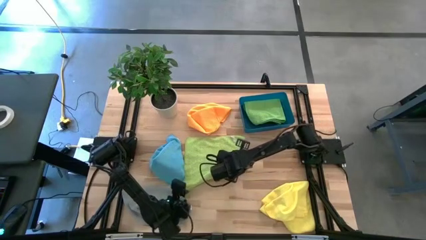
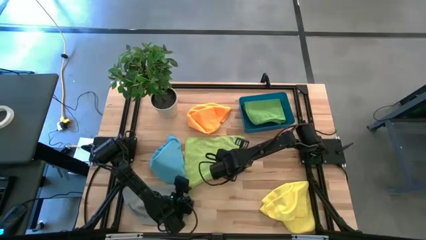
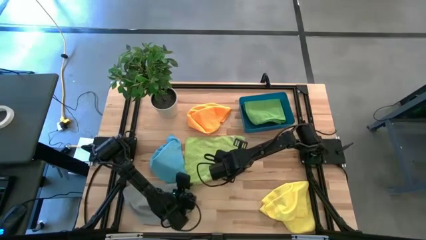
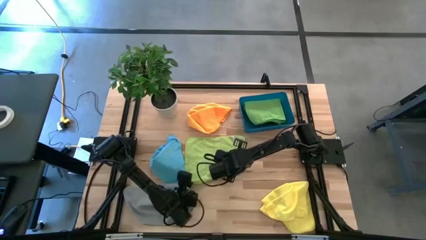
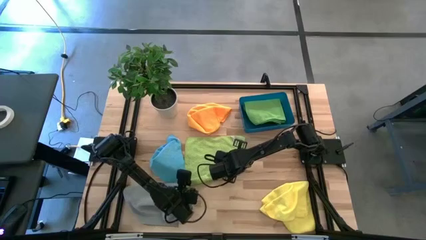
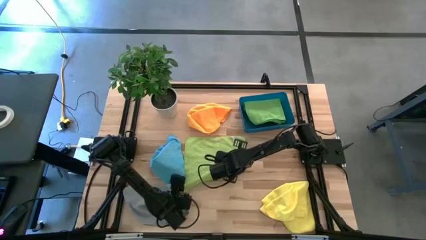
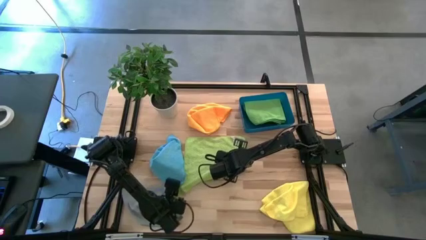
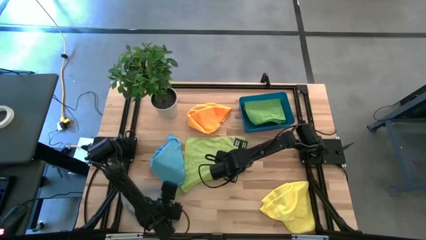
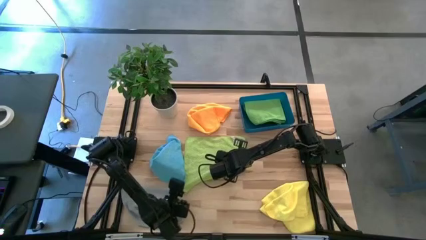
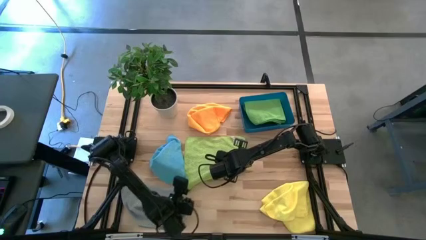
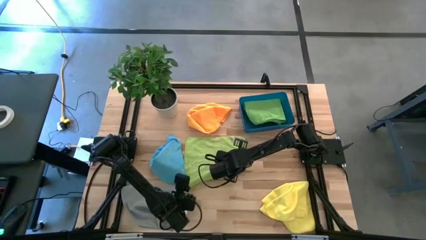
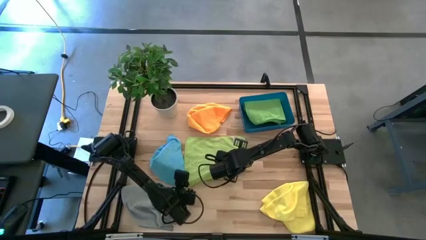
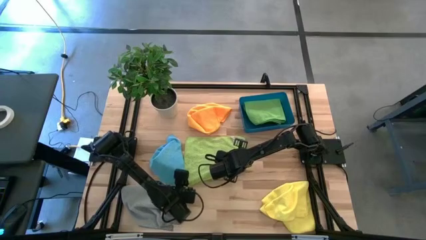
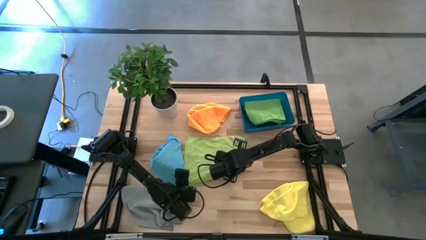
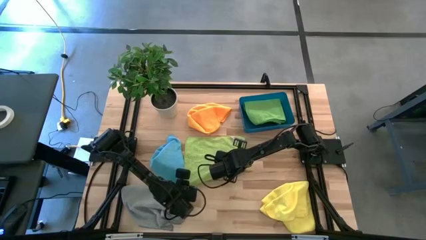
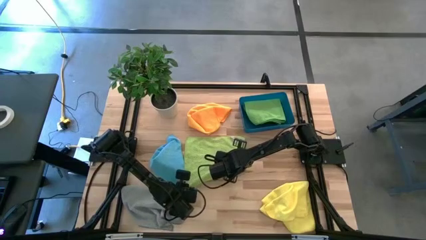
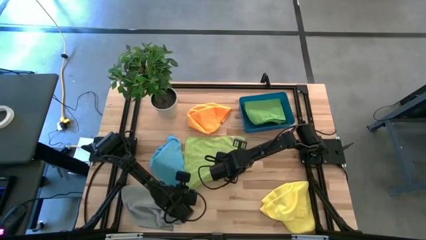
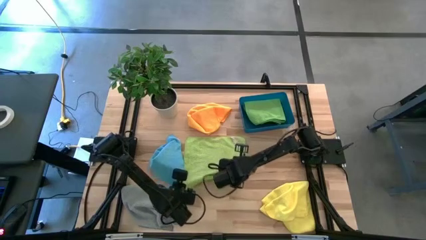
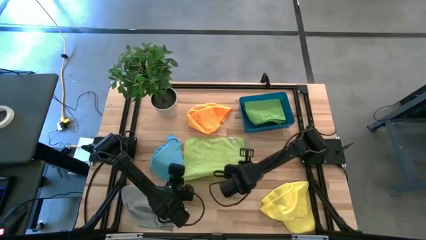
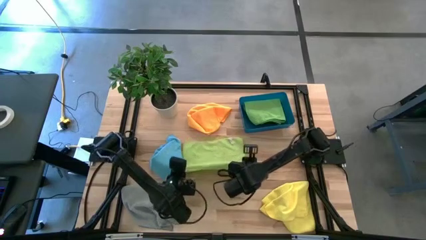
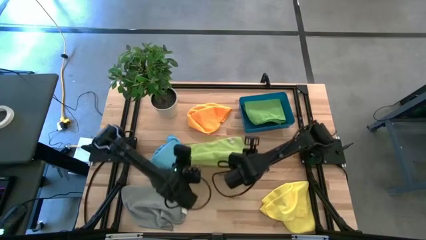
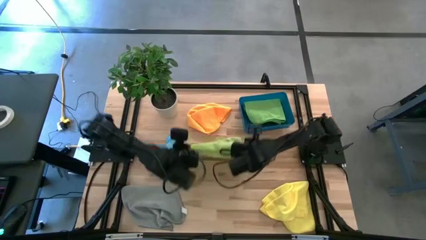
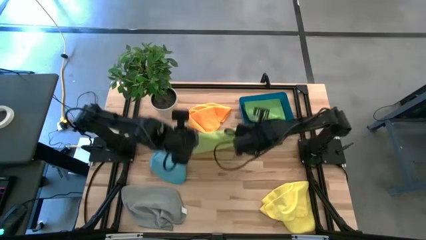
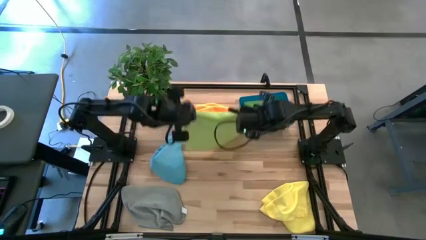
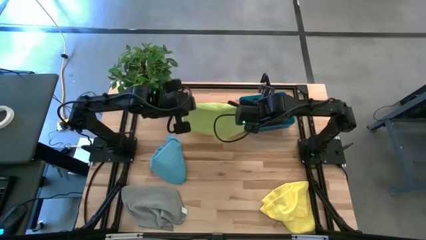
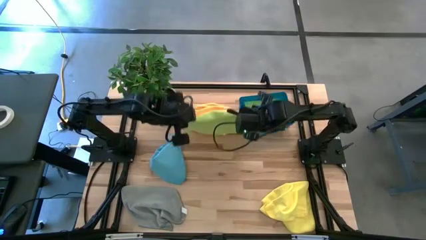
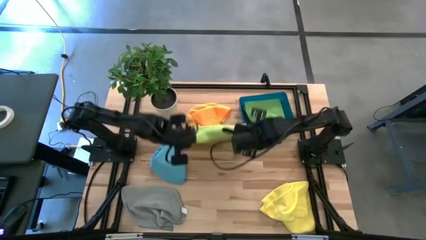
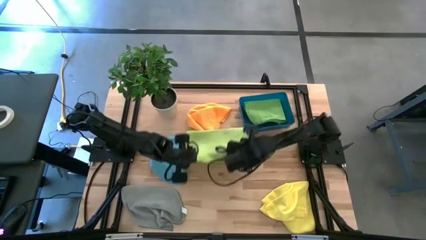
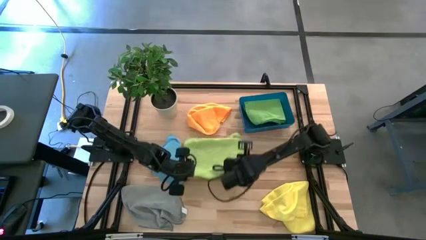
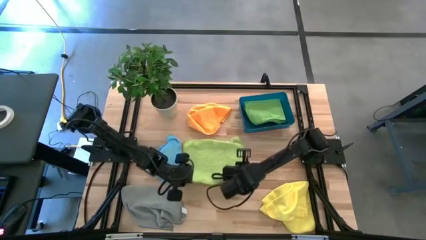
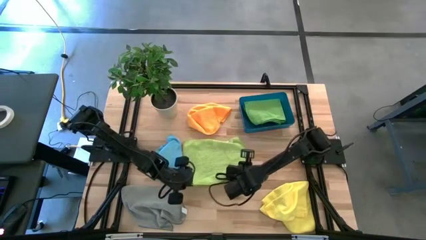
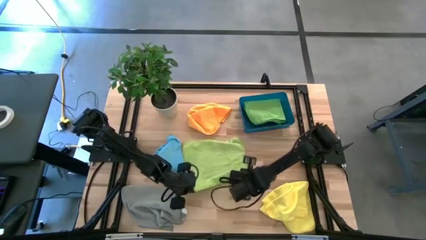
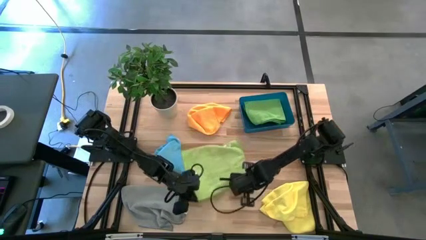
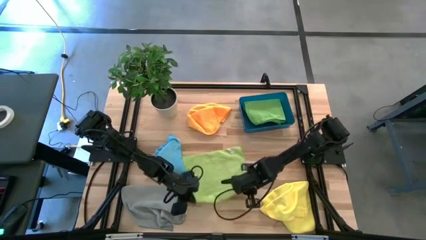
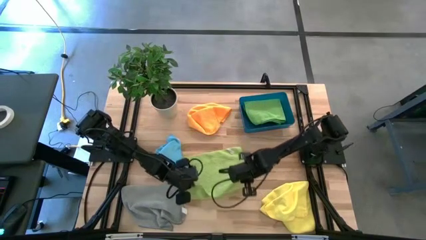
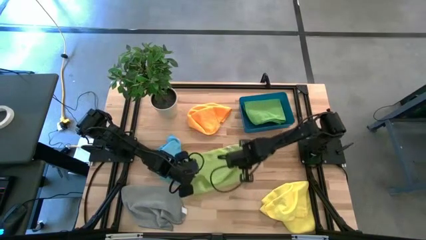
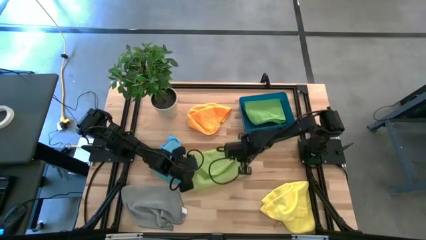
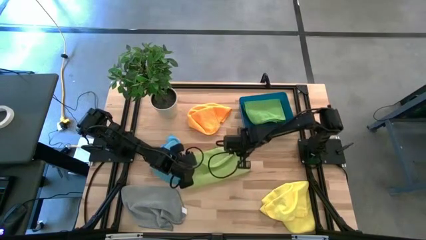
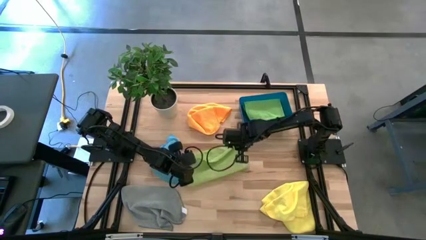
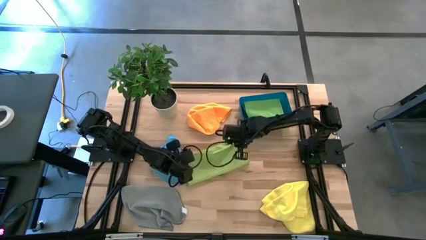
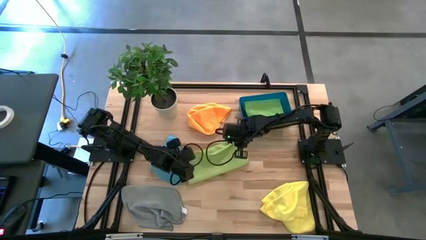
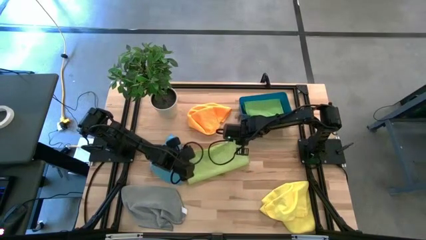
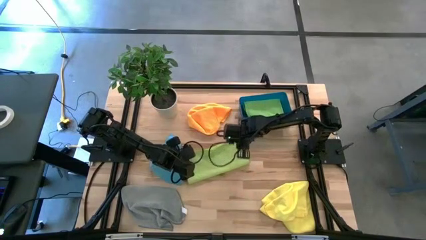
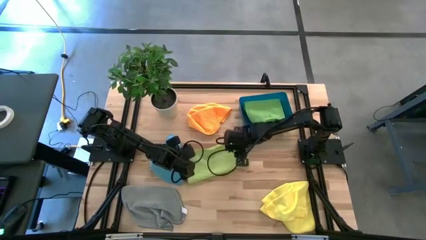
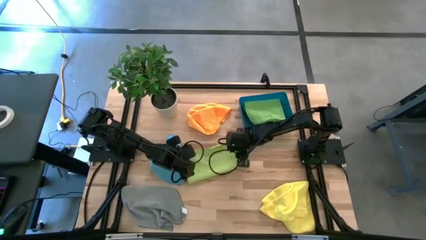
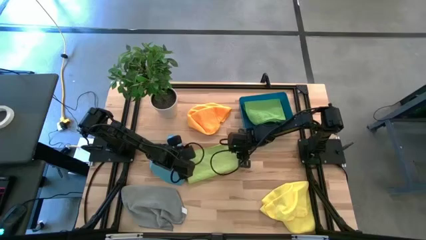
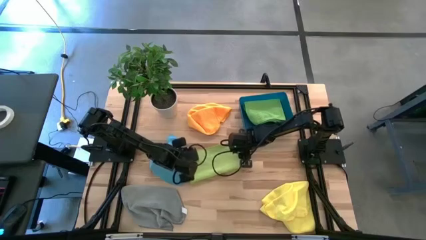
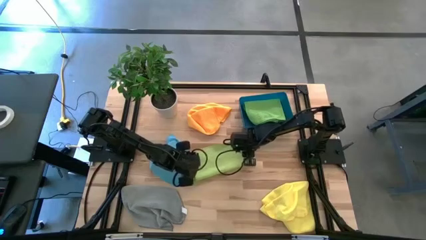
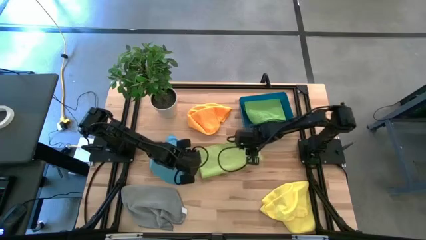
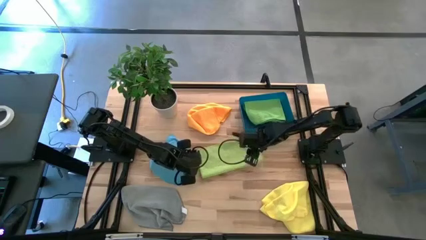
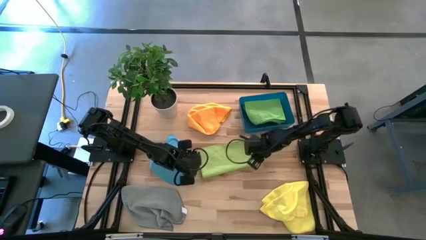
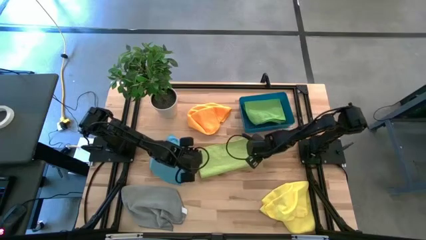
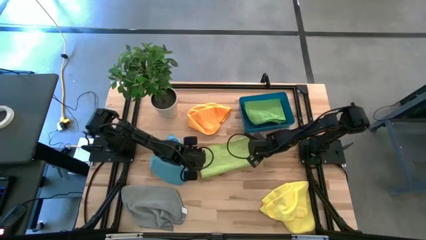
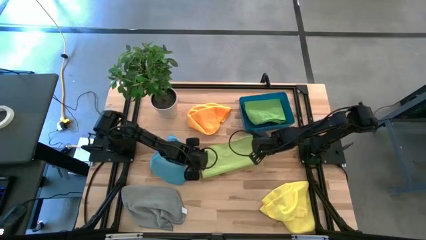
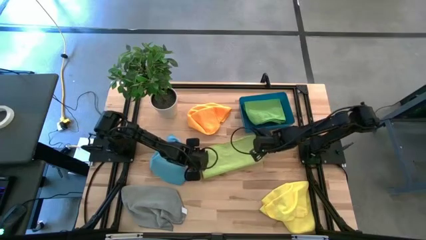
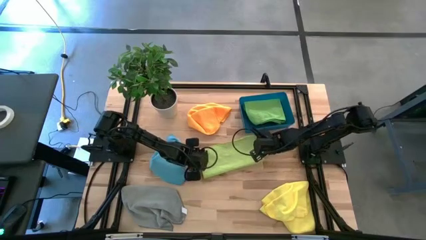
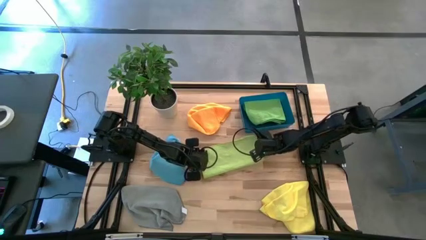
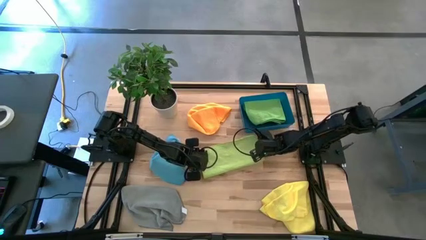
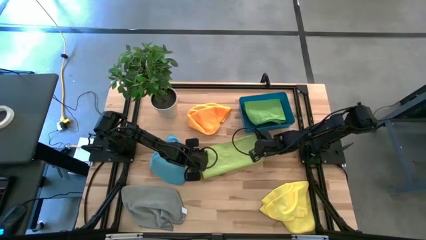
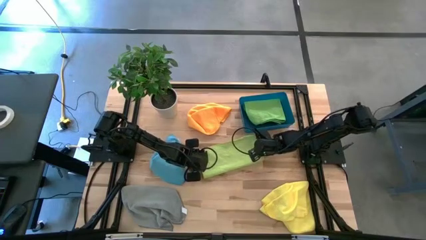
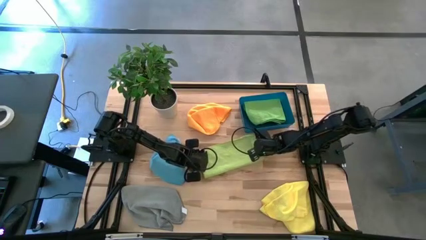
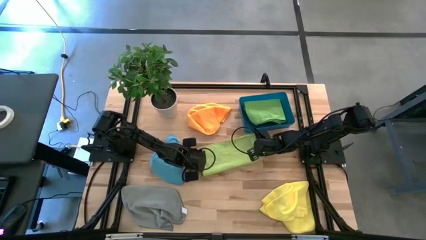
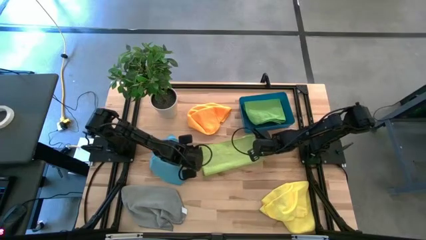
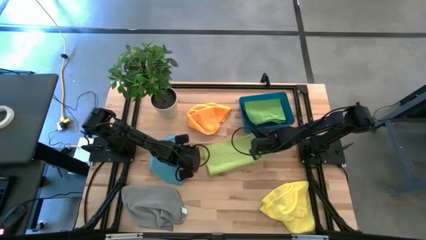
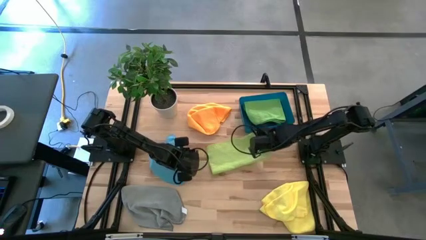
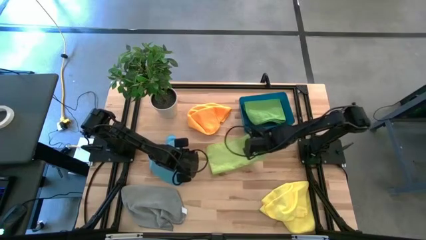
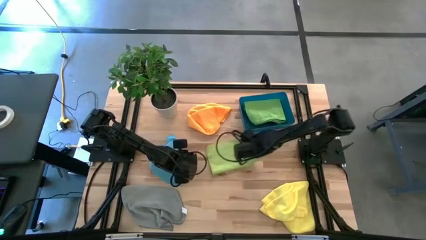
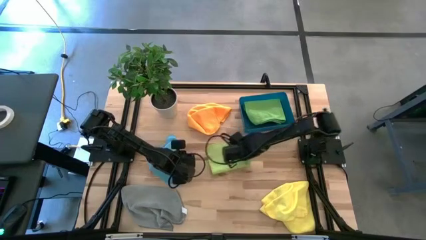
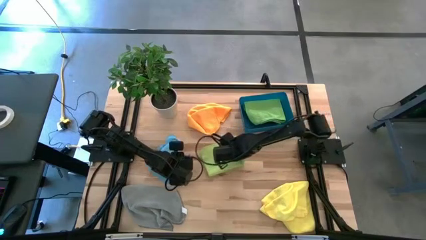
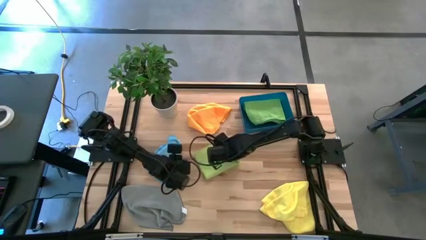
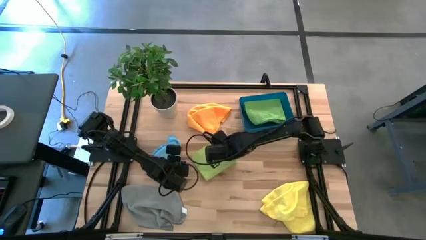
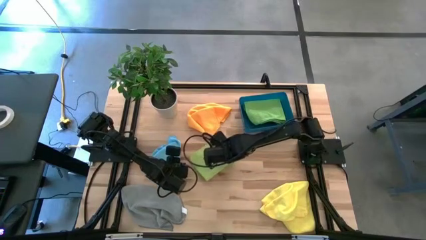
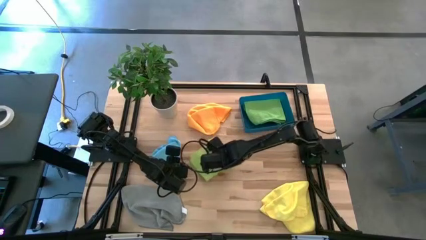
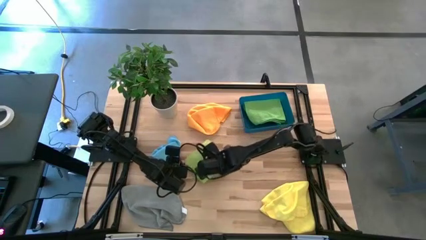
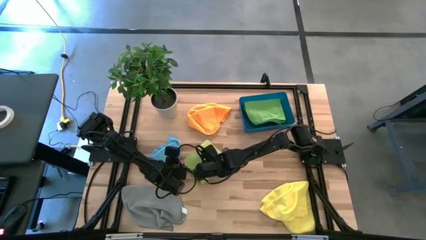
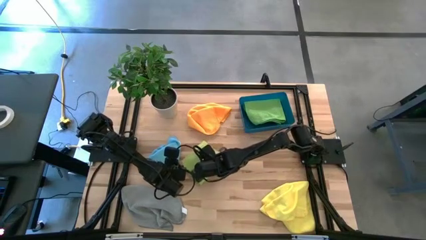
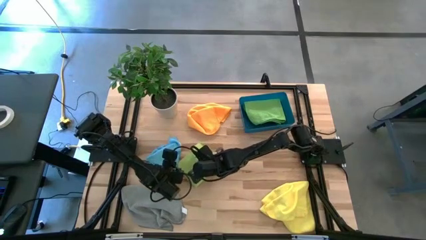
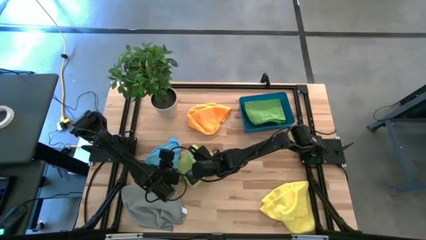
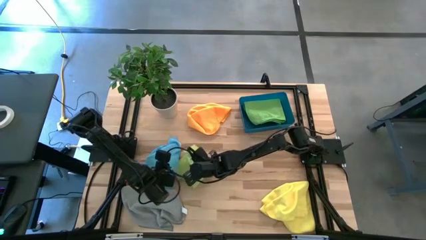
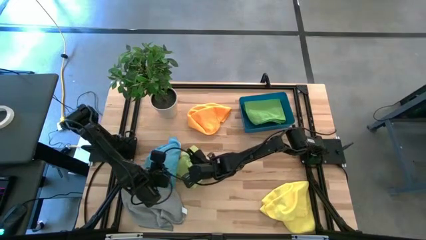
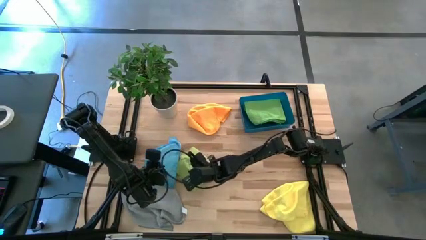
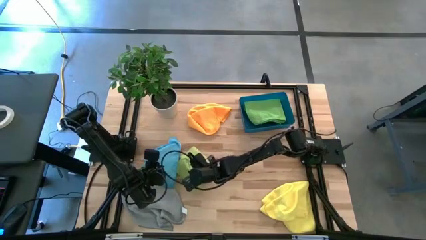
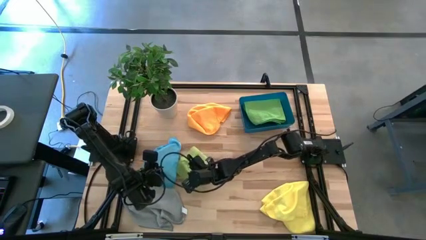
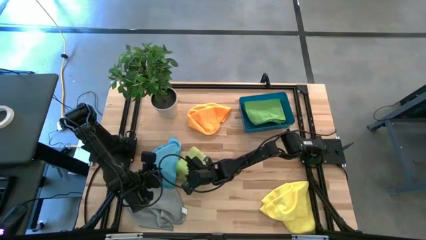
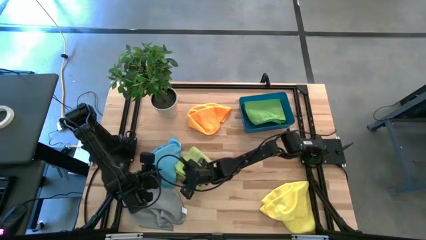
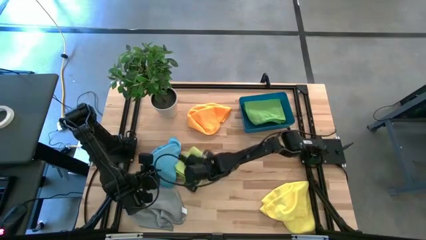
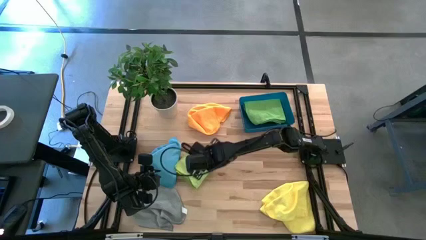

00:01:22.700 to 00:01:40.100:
Task: Fold microfiber towels
Fold the light green microfiber cloth
